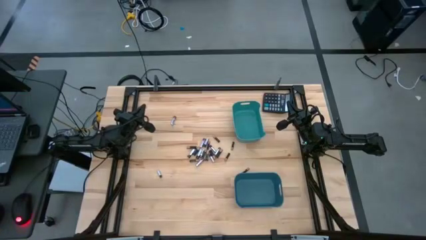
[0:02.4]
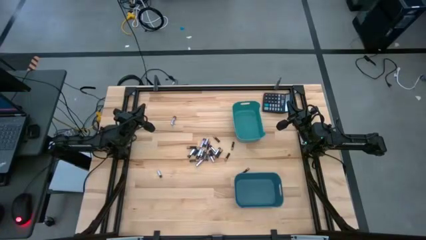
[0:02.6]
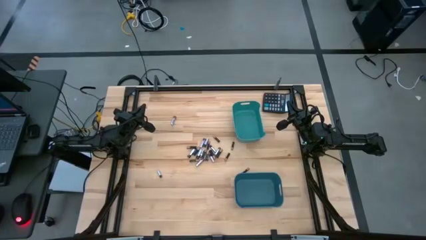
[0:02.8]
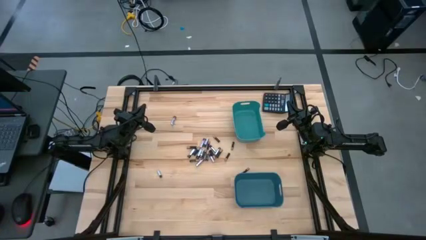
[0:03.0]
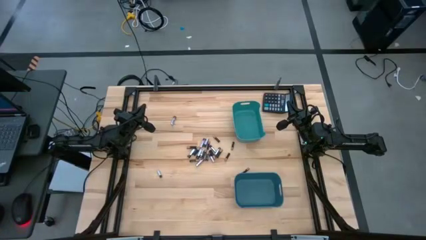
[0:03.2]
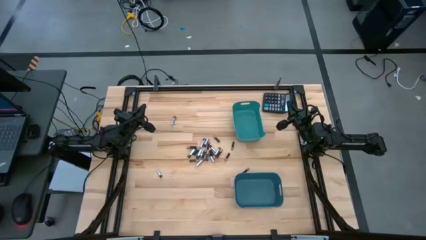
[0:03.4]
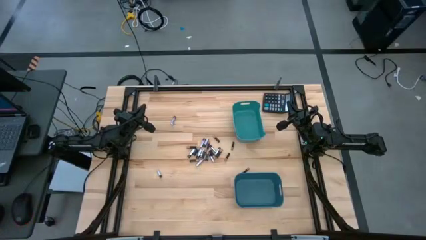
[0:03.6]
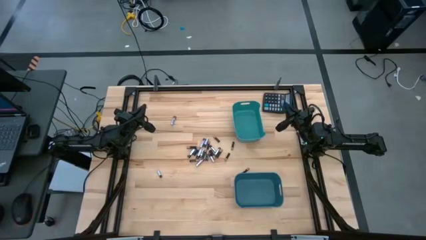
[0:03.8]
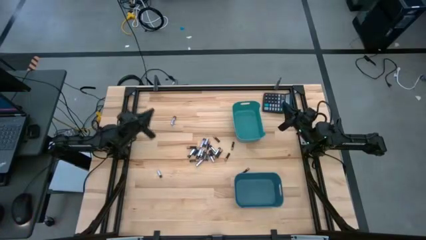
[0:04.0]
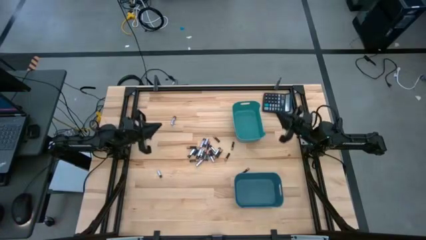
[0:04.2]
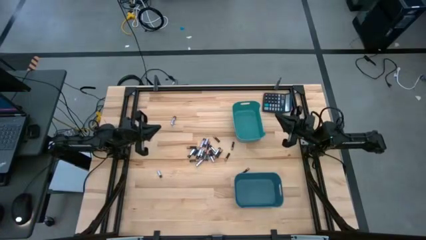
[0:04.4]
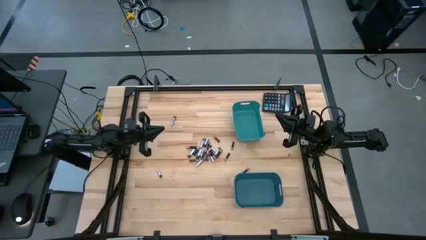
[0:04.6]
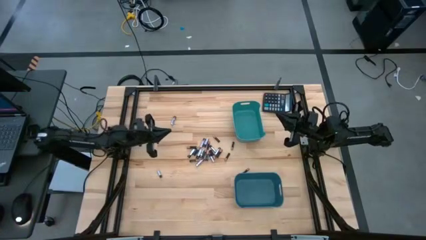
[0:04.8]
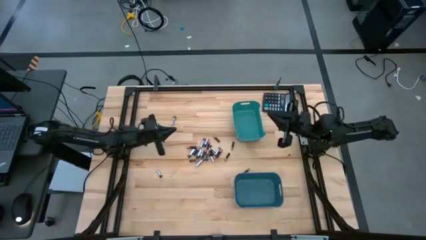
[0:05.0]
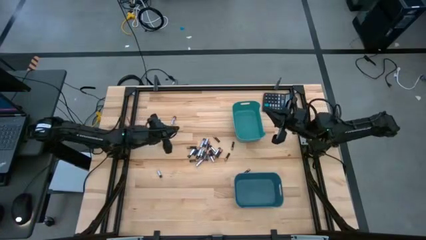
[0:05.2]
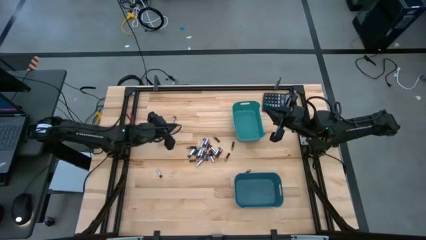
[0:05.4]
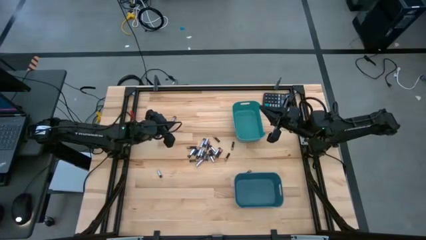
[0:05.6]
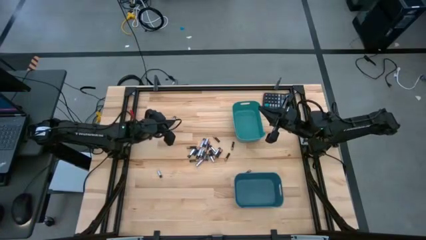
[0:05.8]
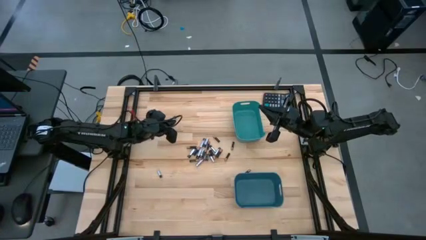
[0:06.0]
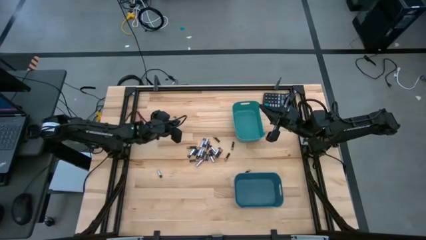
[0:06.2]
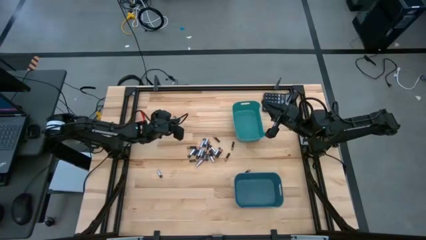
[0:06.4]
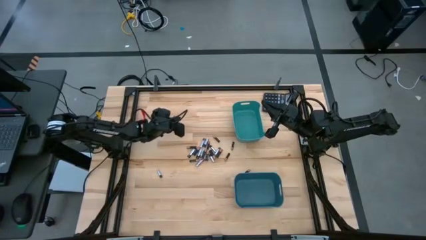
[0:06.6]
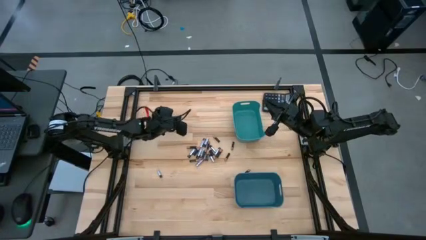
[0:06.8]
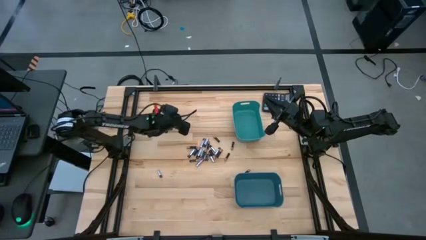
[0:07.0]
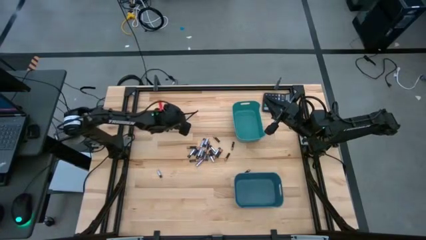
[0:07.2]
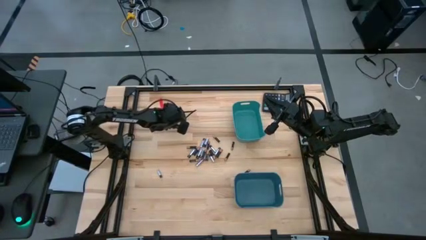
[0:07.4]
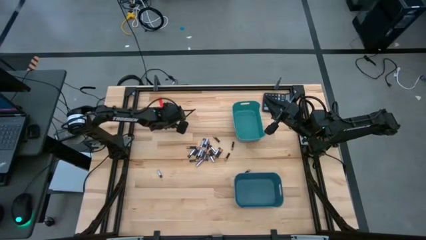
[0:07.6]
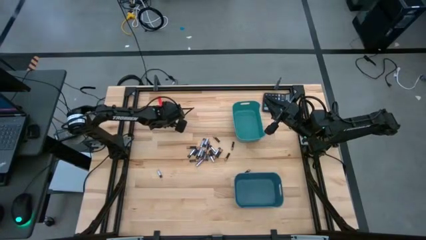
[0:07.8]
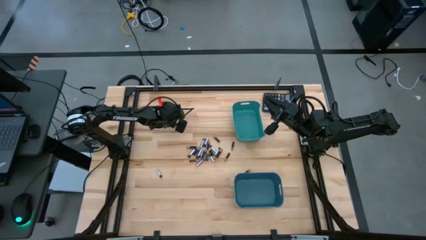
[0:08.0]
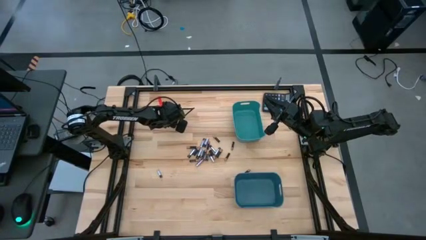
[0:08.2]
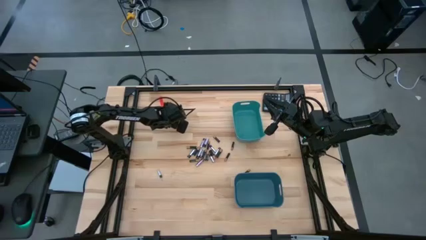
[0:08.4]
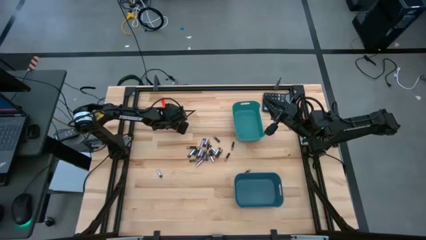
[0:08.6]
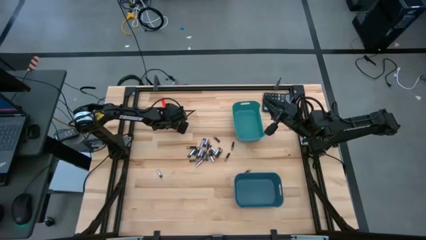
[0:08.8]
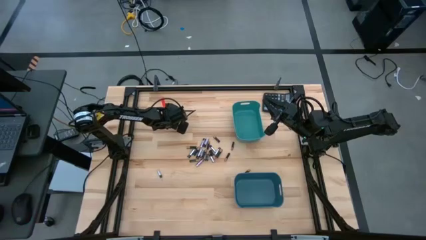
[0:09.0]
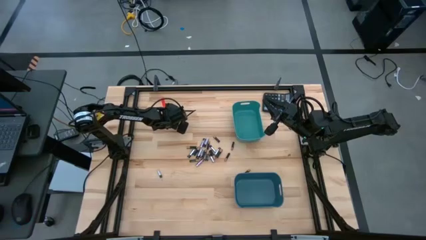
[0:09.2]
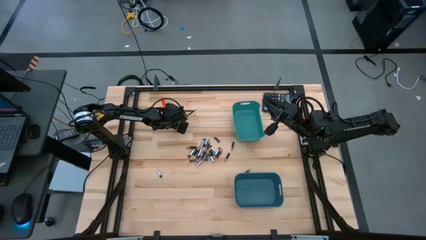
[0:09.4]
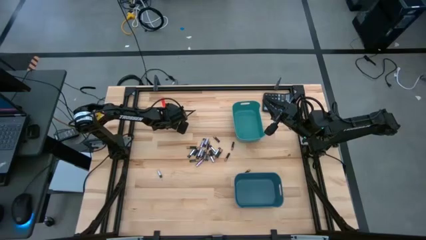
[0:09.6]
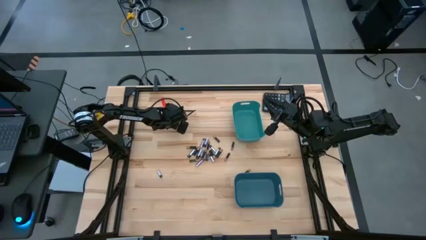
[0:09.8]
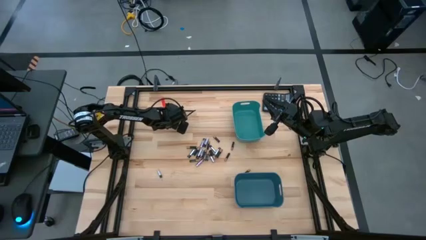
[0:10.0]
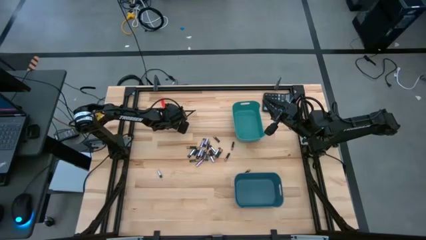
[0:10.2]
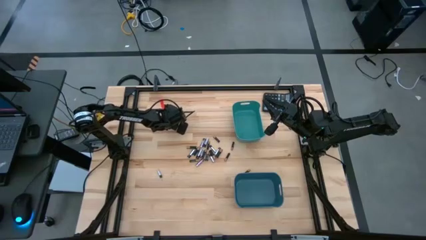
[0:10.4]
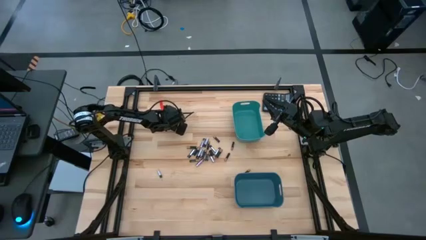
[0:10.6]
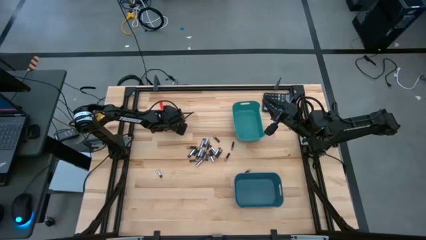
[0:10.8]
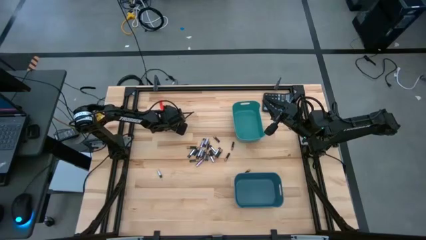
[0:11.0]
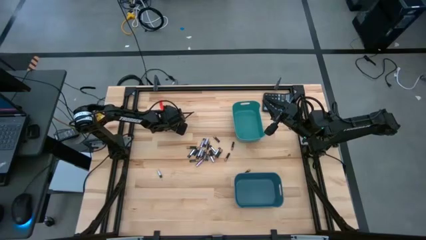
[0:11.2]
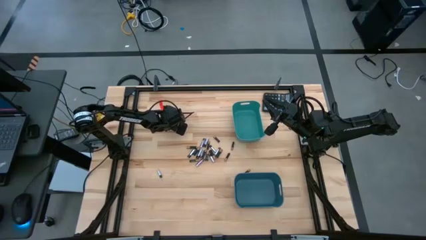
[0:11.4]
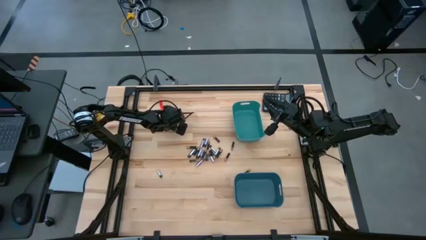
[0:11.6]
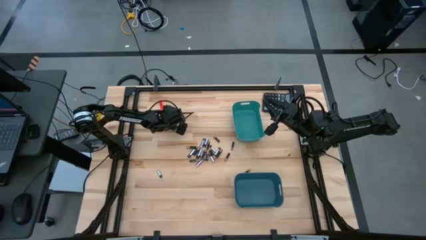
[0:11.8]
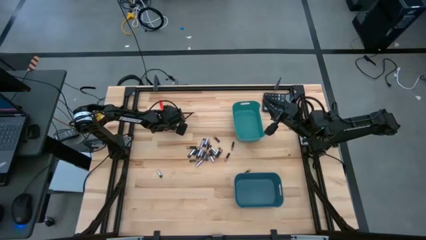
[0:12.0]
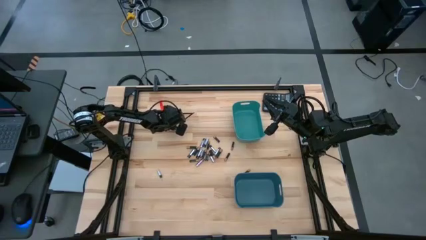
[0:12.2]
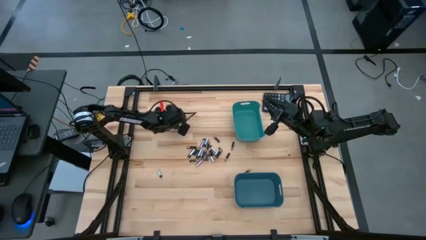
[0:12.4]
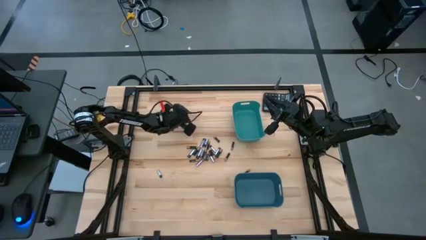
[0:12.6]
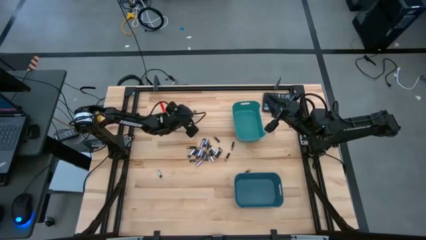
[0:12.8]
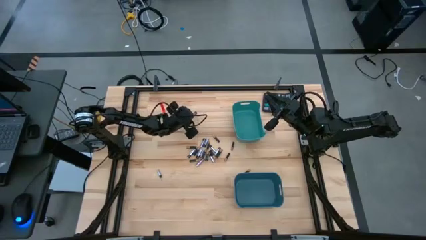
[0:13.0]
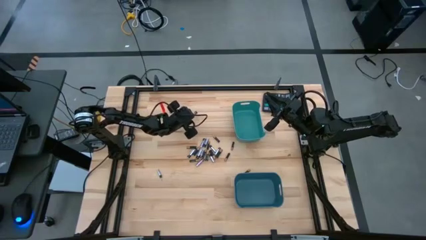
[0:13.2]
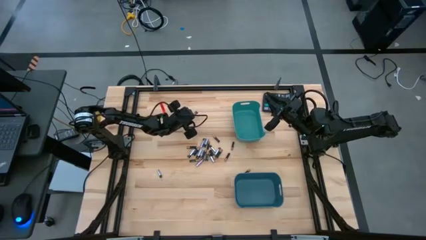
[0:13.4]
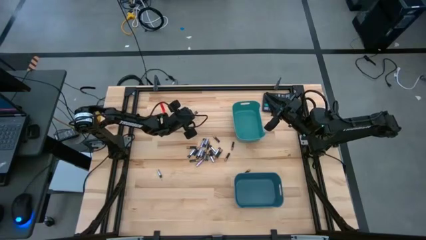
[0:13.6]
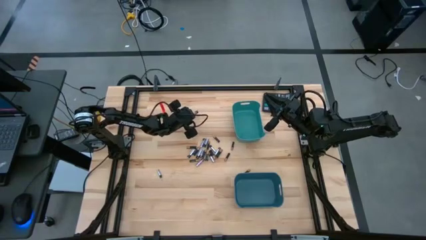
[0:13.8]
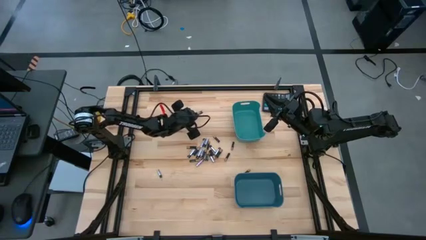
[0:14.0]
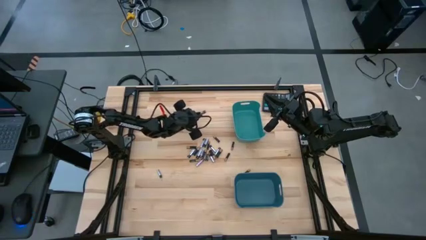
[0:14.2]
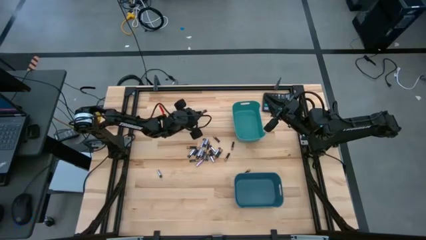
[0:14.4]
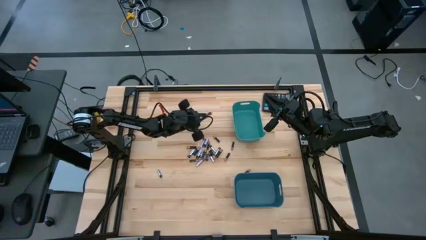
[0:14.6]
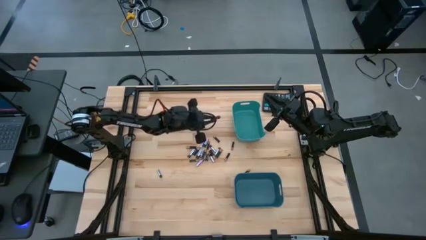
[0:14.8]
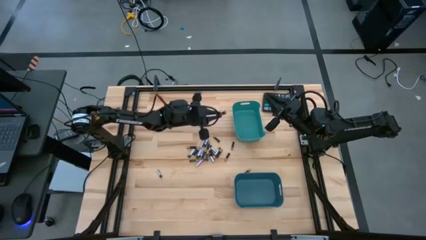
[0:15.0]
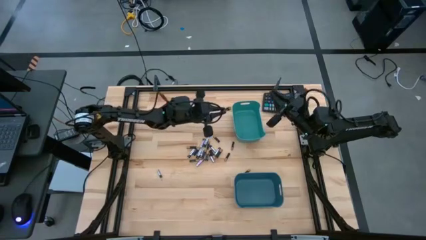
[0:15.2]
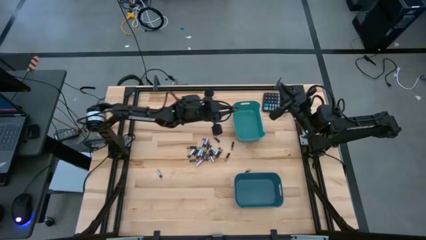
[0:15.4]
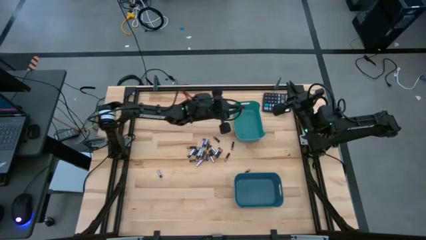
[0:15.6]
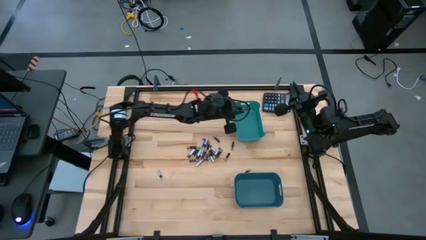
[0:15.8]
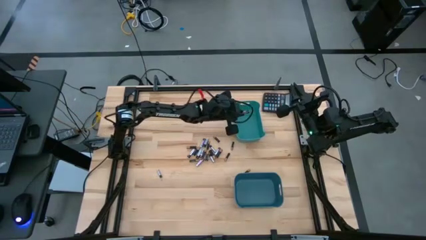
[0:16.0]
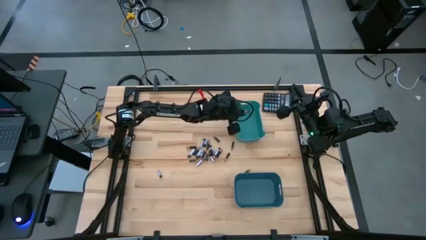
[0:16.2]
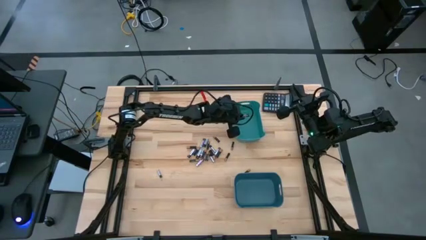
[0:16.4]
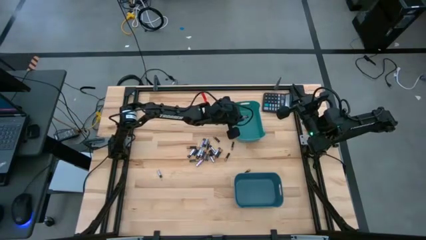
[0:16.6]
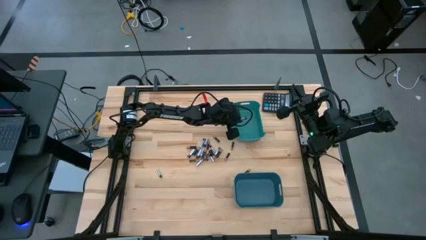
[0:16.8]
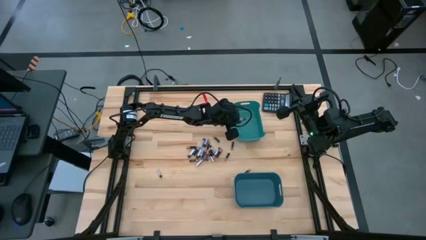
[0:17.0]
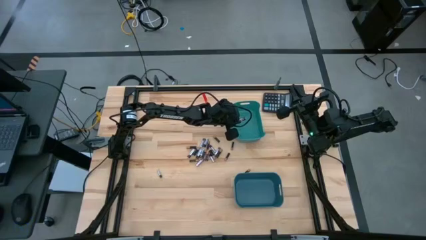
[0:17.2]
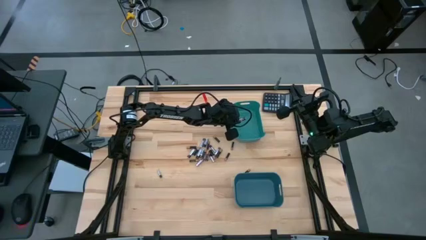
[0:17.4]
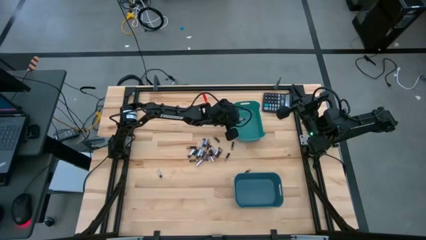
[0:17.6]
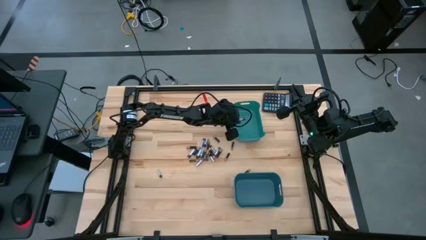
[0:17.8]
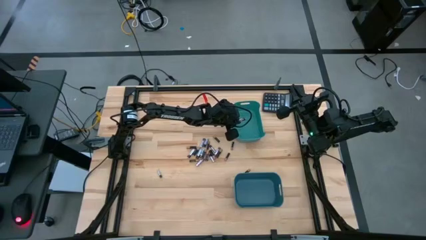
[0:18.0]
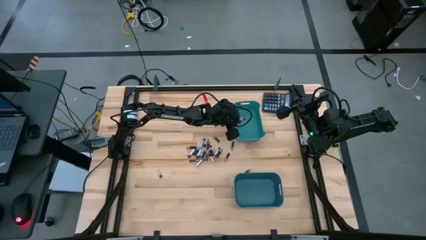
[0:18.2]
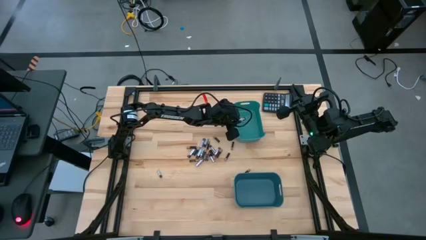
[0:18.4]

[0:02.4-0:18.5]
Task: Sort batteries
Put the silver battery into the green bin
